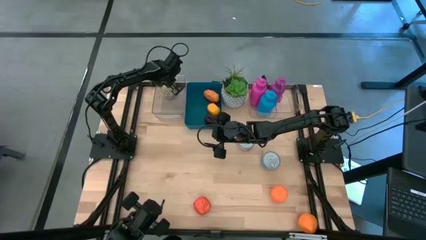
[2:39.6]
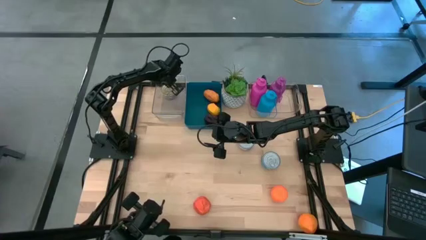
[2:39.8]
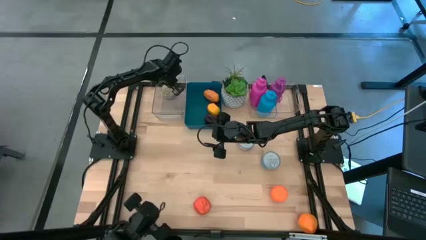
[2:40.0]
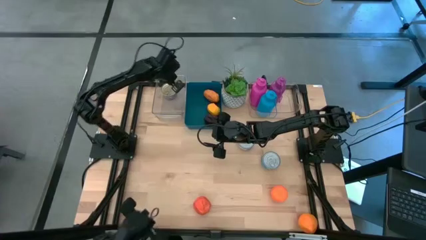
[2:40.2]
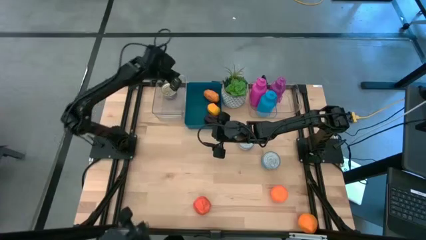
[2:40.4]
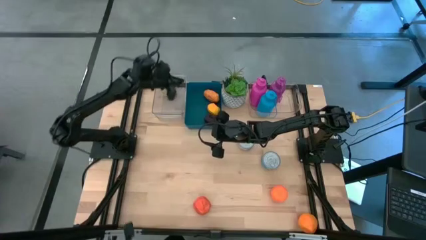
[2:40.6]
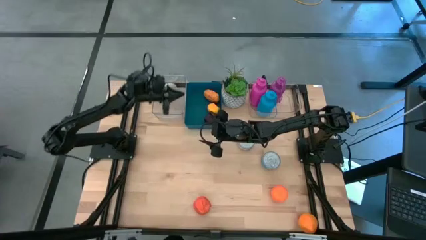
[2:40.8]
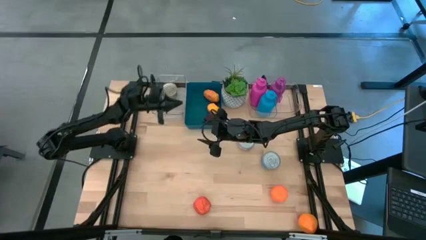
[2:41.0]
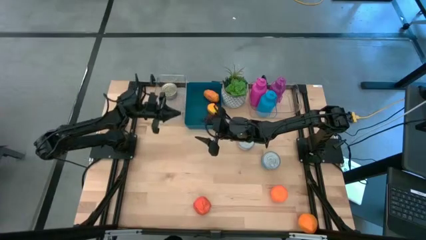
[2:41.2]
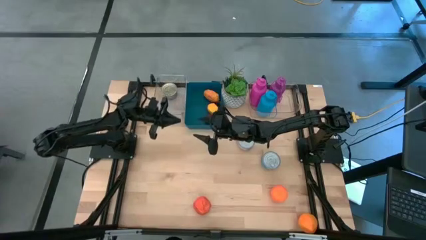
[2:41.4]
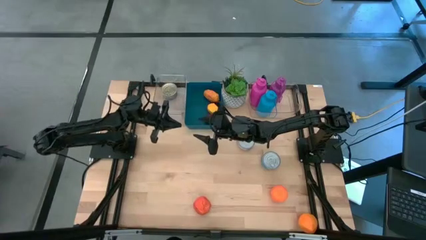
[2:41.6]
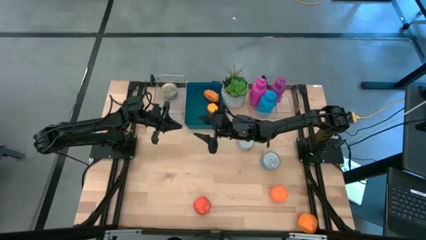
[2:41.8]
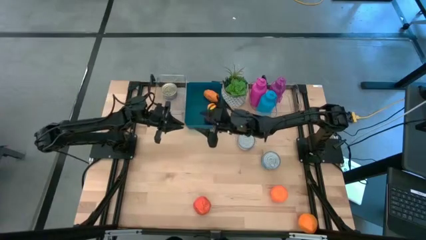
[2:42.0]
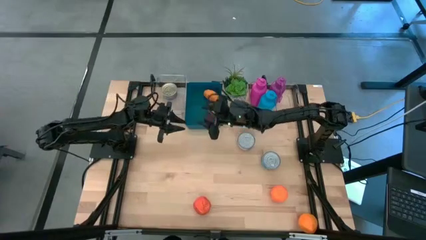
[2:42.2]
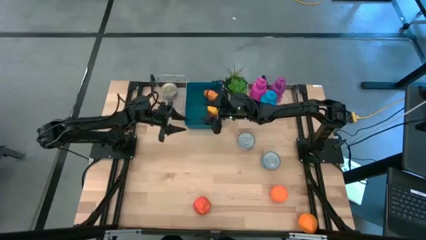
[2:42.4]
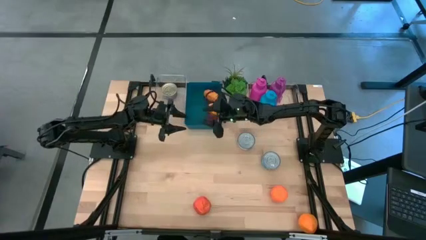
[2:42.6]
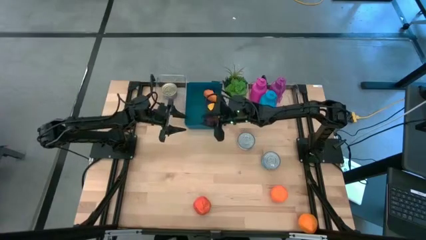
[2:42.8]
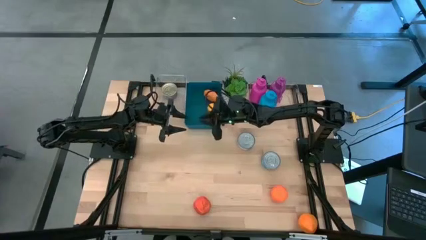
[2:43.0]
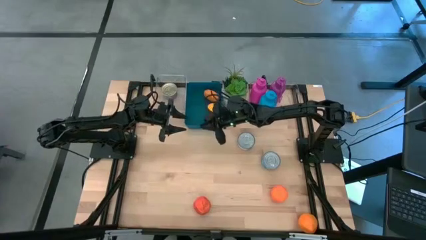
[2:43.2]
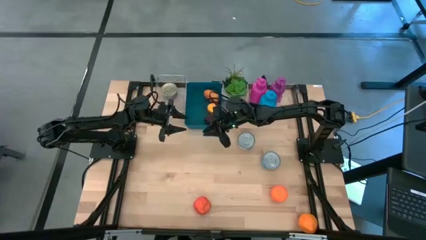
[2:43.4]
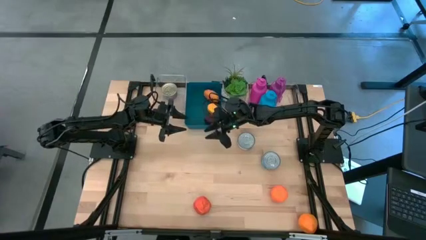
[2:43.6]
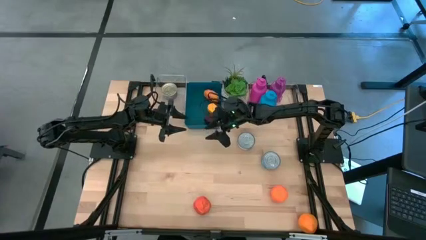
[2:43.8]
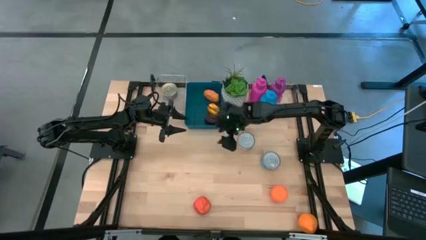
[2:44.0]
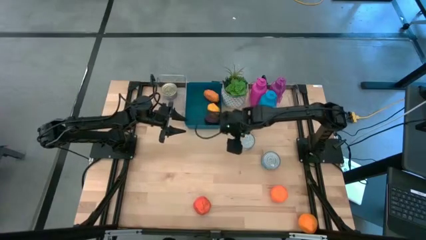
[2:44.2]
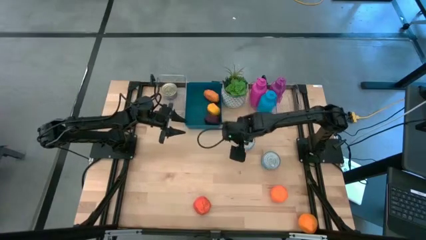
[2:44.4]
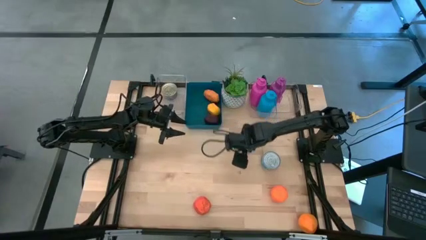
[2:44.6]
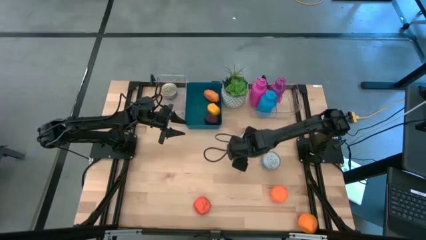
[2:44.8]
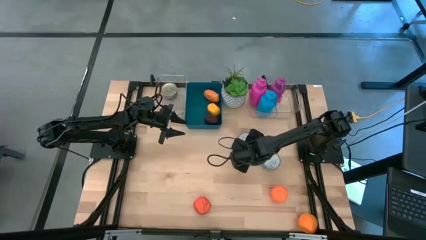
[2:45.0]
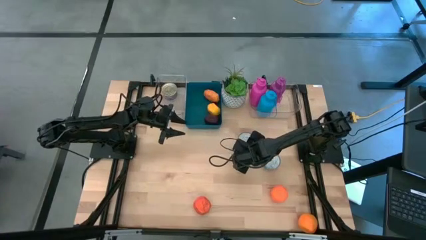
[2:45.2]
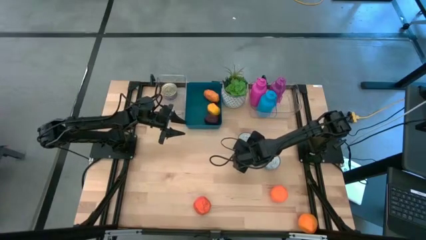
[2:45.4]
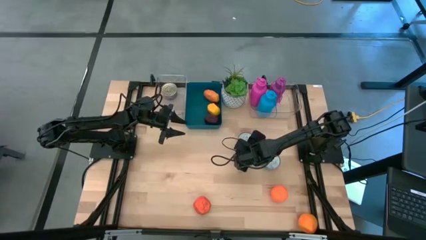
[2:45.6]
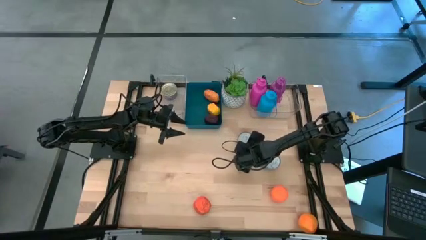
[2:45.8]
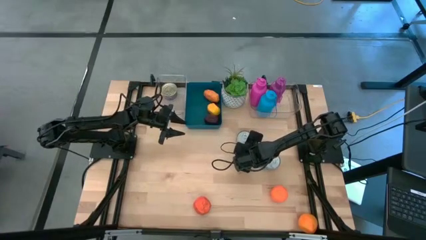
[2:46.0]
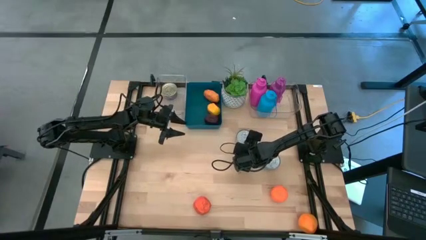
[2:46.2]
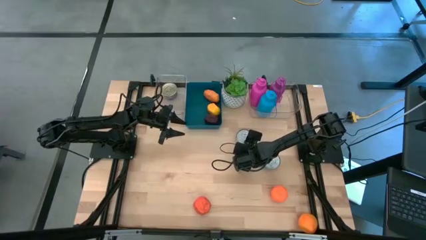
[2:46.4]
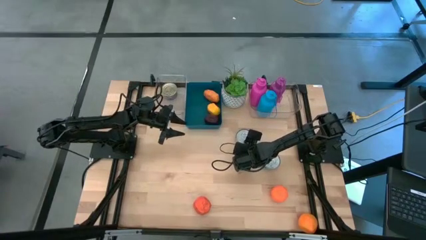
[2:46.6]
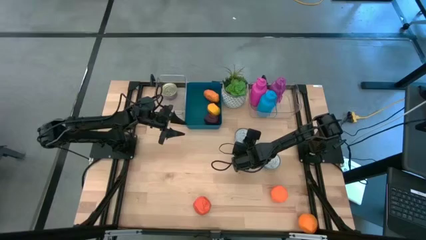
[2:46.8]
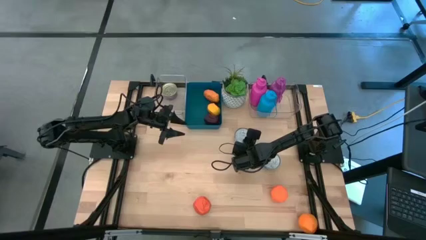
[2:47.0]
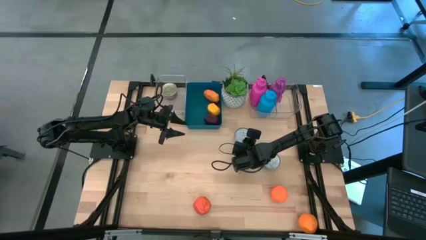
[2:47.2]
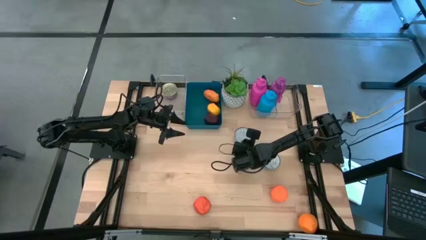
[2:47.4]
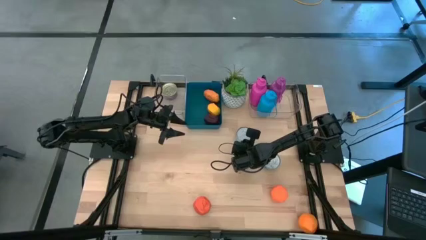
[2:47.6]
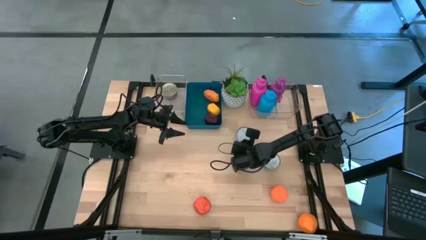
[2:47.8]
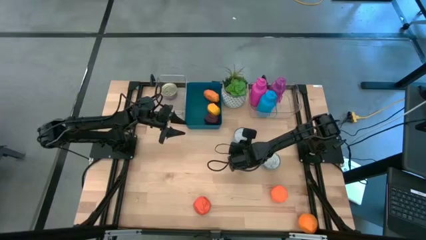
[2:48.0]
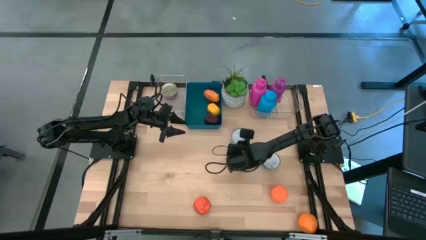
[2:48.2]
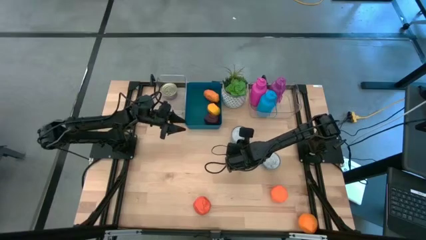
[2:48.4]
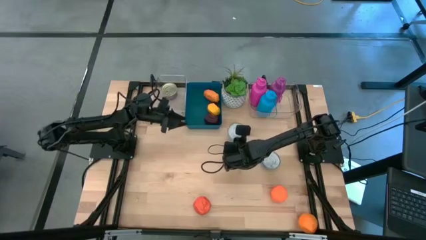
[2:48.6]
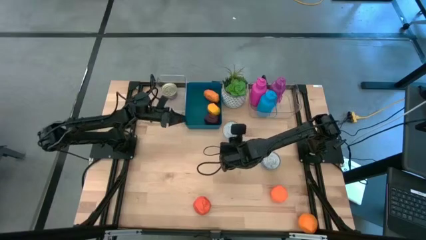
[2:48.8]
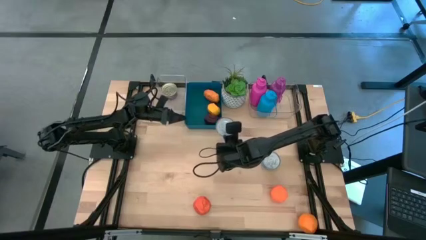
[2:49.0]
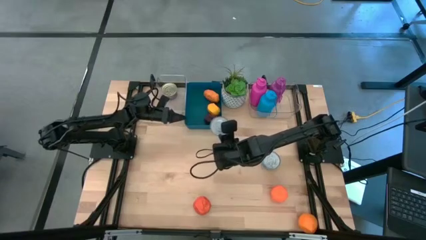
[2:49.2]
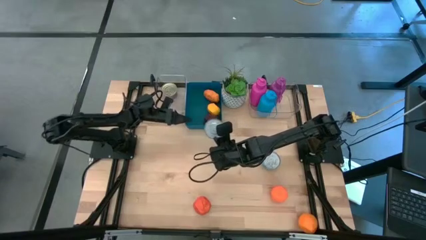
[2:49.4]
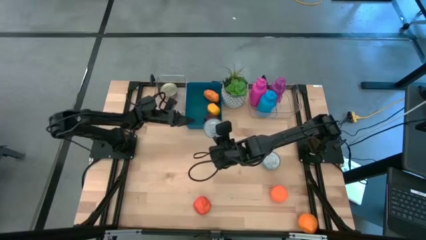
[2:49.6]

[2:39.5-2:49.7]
Task: Pick & Place Food Item
Put the blue tuna can into the left transparent bin

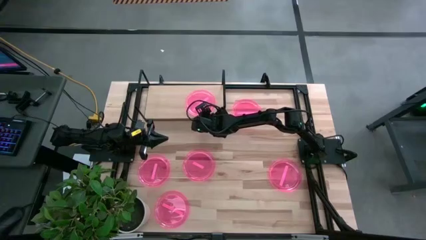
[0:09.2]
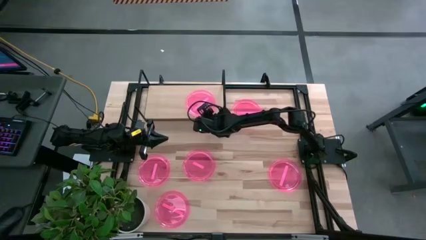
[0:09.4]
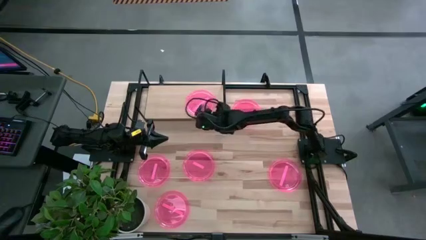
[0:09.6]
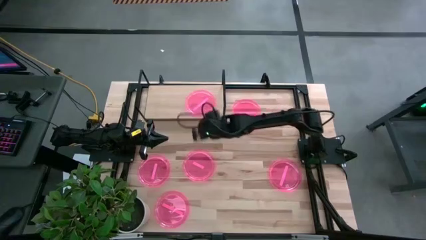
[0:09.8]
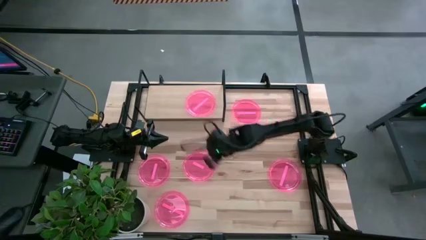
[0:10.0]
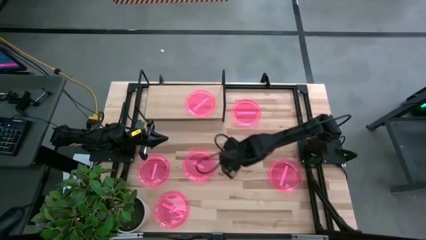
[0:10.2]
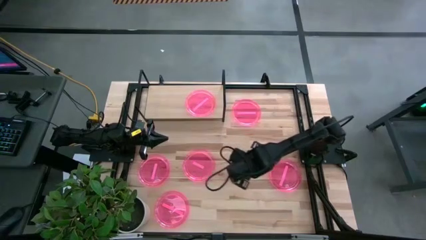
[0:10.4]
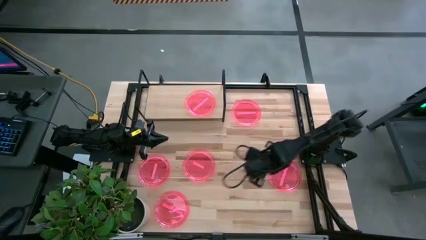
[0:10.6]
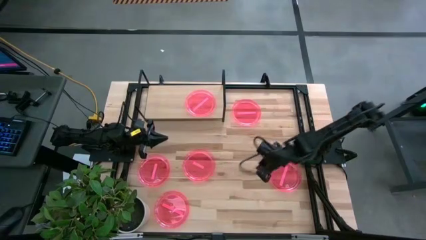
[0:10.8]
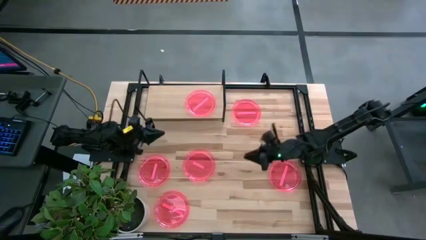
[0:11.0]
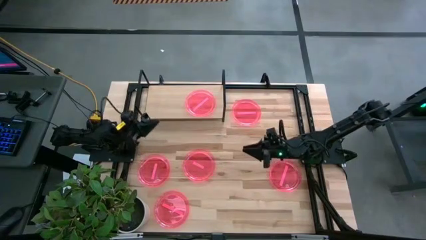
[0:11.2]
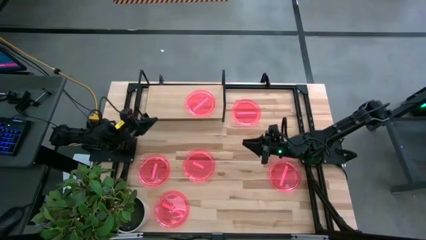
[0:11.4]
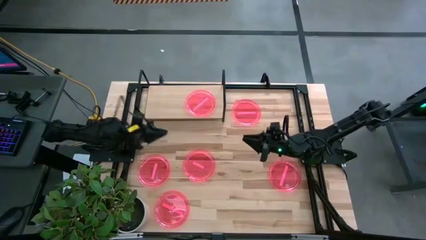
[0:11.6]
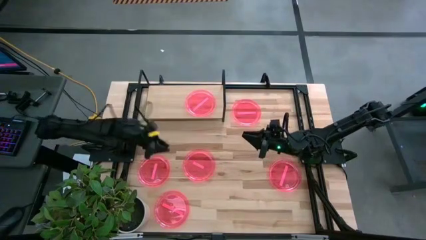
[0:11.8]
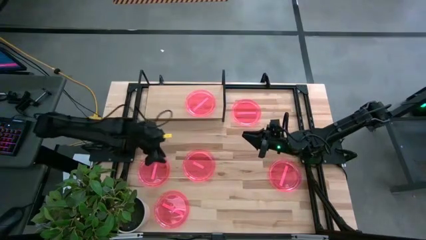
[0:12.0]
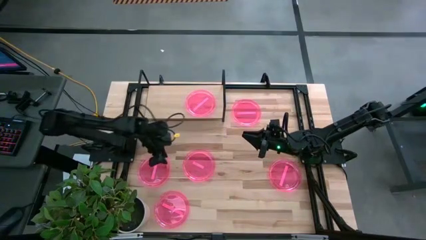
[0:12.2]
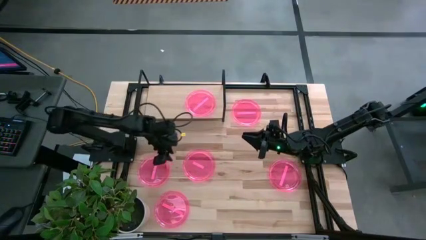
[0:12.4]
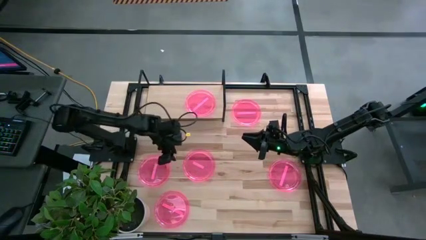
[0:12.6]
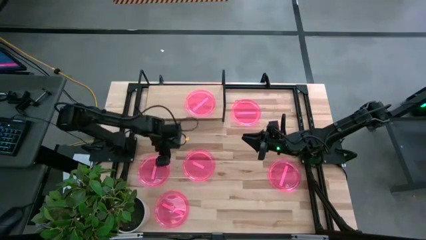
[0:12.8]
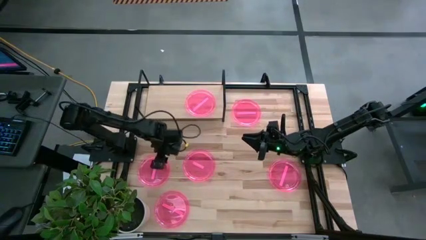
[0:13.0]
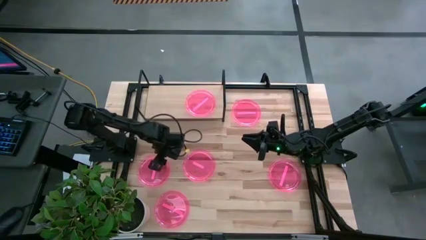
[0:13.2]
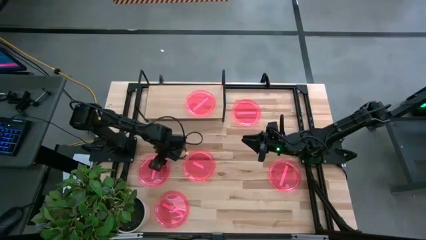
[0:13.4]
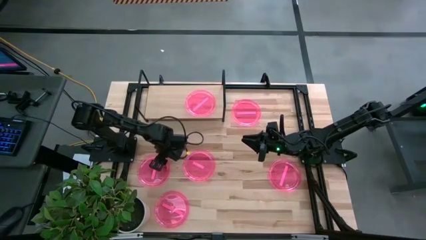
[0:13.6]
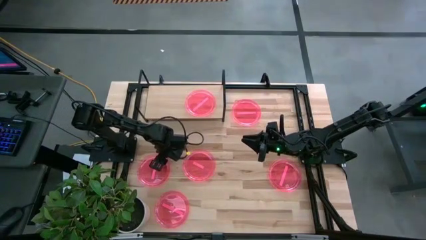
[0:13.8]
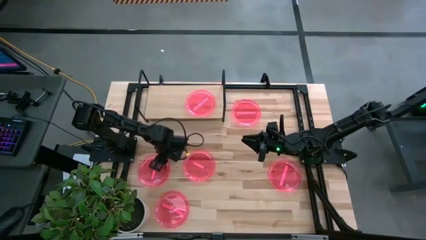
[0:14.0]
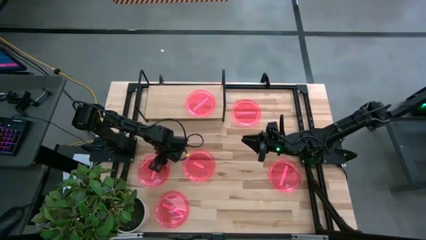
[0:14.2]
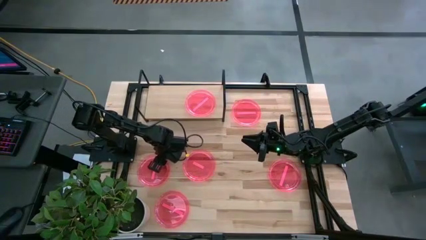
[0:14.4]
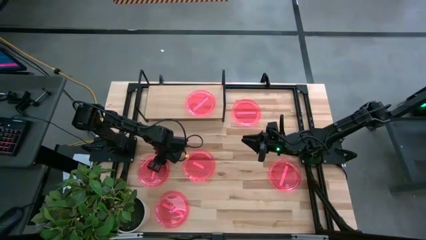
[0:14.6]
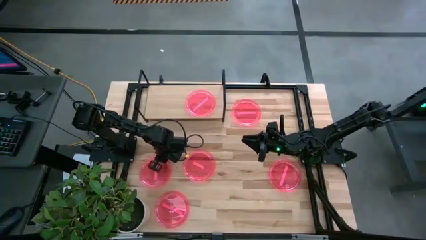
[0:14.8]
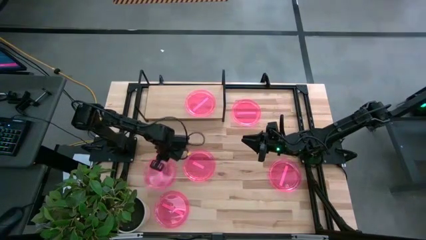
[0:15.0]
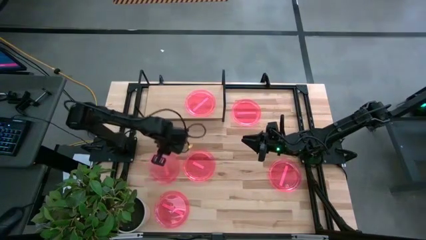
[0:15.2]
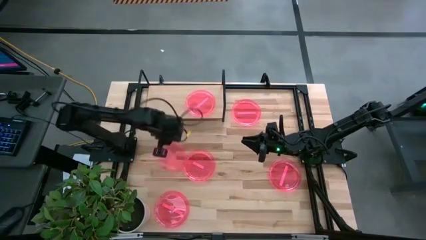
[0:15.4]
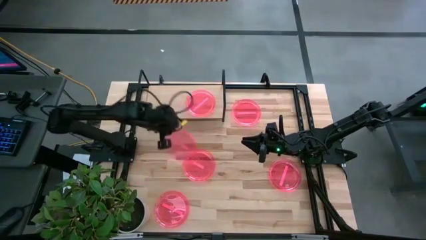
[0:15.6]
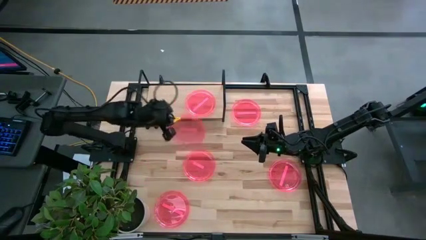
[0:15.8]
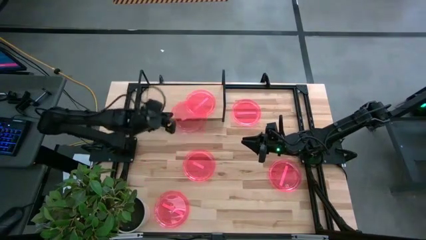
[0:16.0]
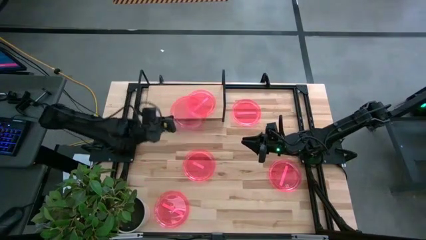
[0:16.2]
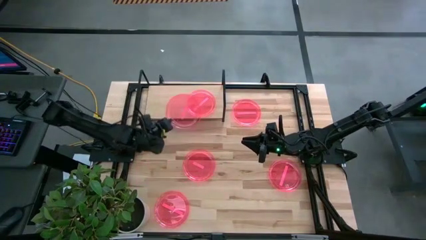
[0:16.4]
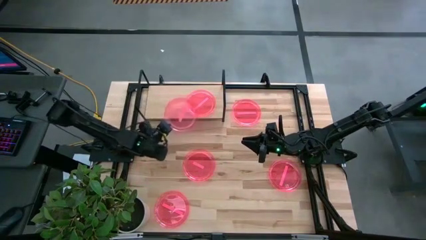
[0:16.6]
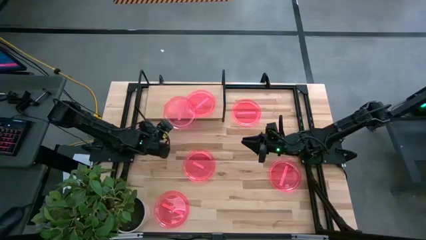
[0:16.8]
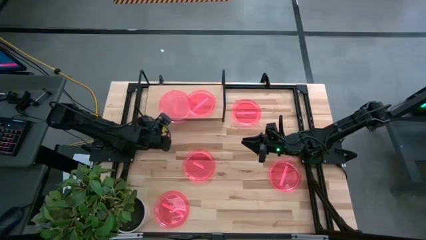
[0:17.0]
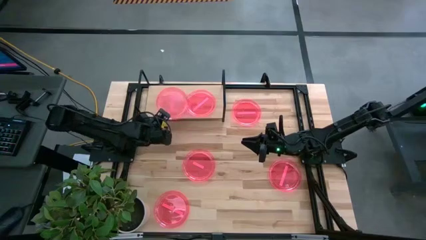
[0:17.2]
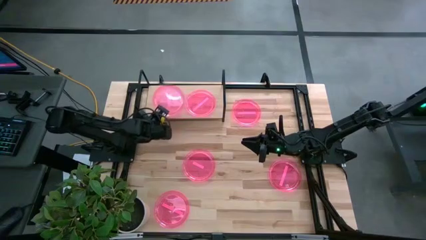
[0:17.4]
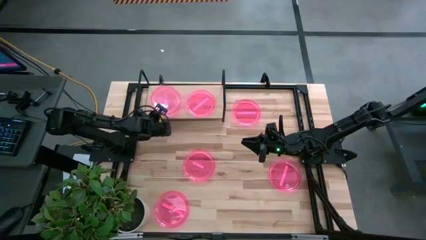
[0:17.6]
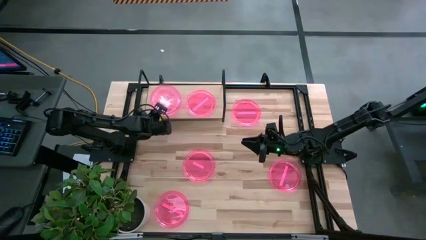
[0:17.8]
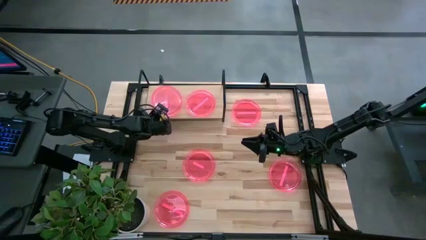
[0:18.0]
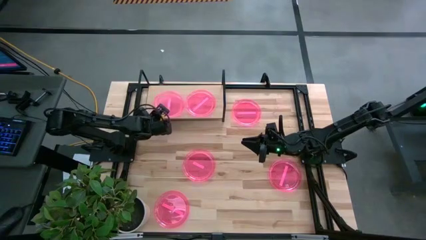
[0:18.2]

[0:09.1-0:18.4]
Task: Place and stack plates onto a shelf
Put the pink plate on the shelf
